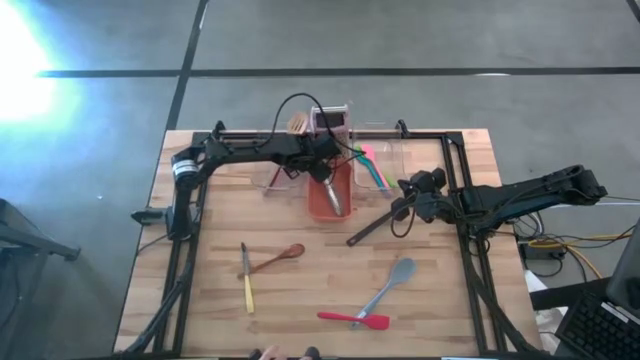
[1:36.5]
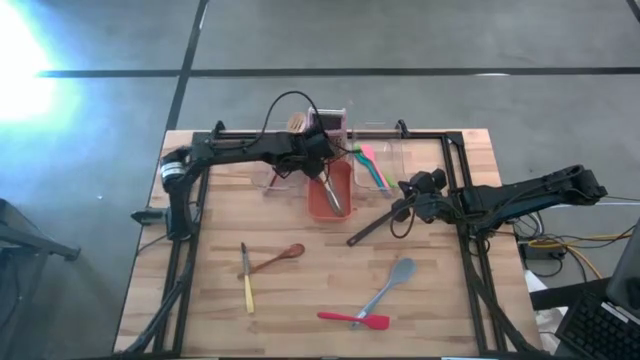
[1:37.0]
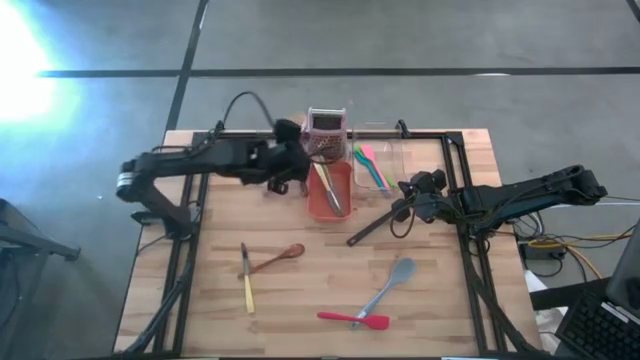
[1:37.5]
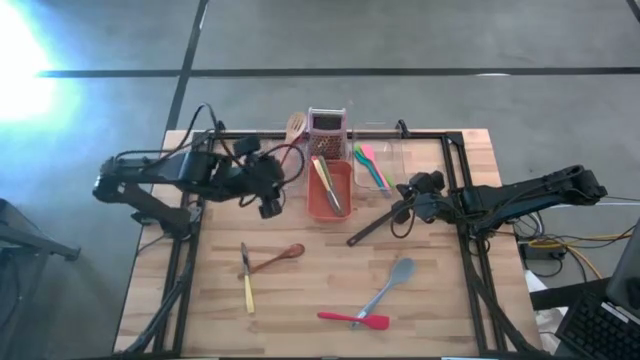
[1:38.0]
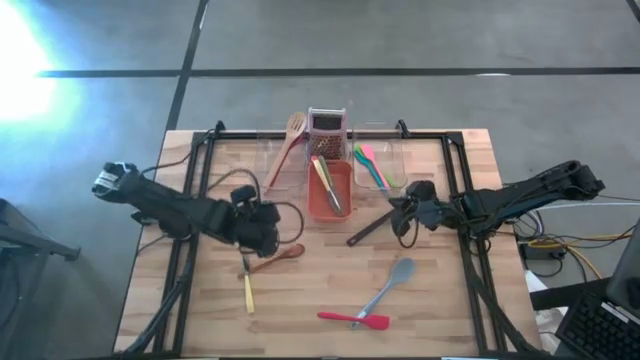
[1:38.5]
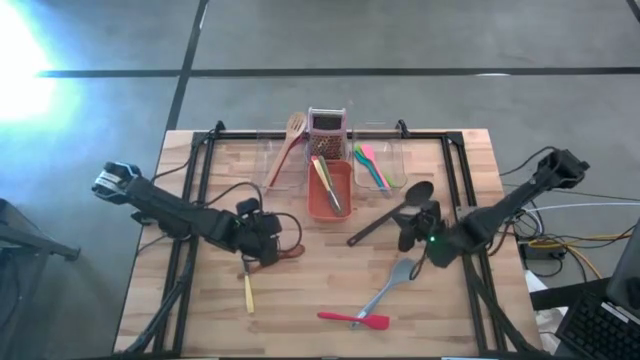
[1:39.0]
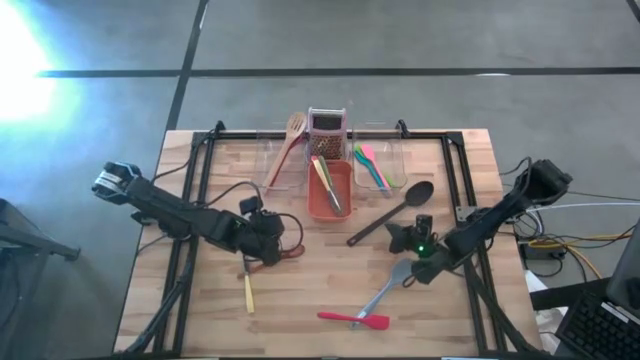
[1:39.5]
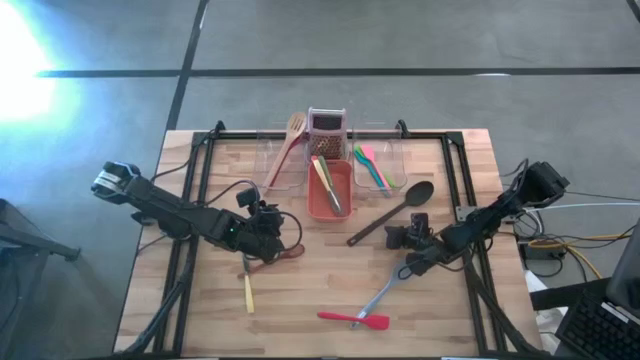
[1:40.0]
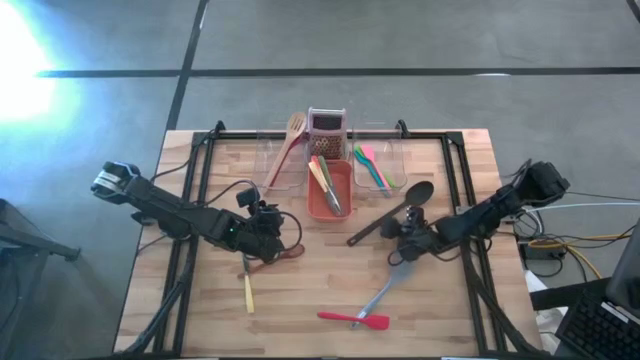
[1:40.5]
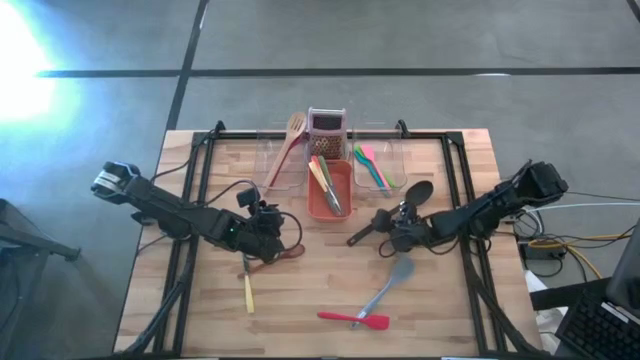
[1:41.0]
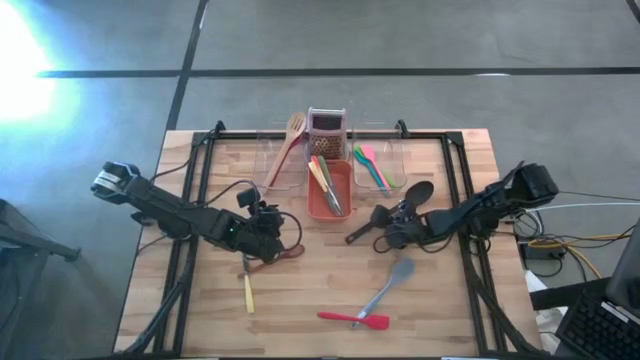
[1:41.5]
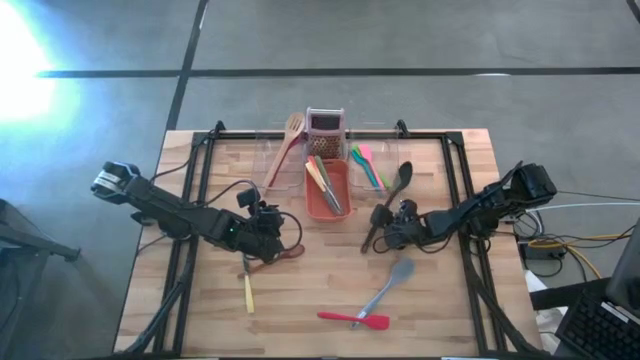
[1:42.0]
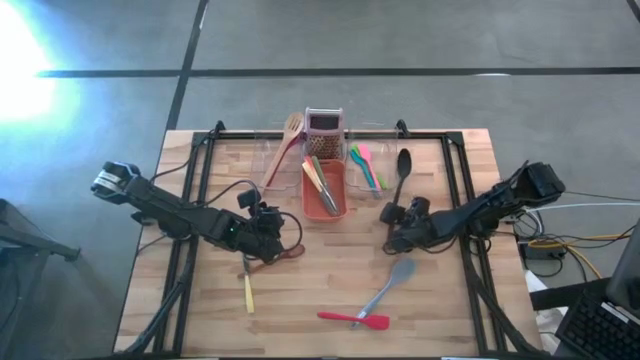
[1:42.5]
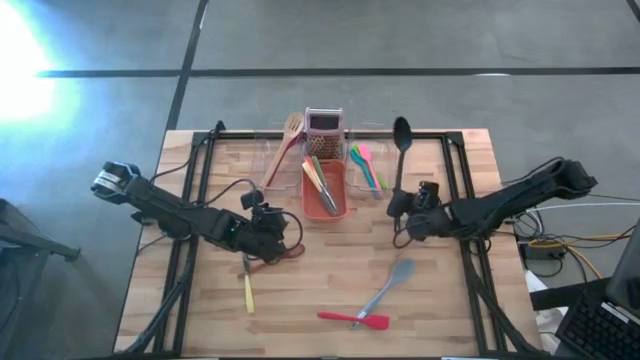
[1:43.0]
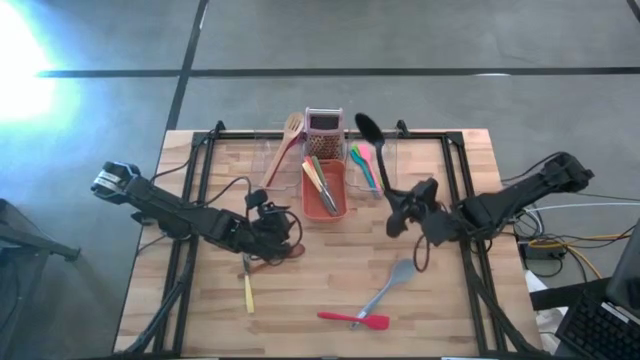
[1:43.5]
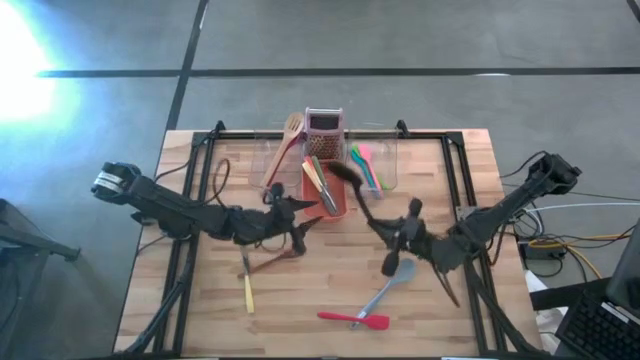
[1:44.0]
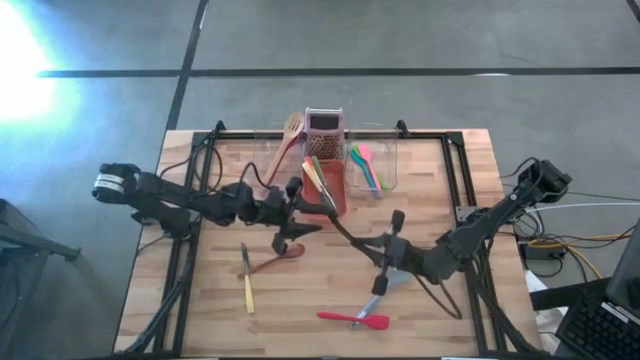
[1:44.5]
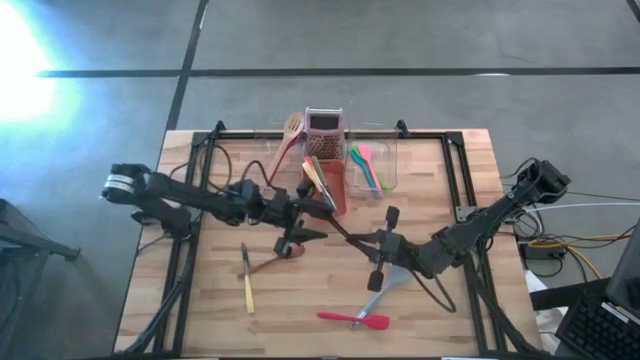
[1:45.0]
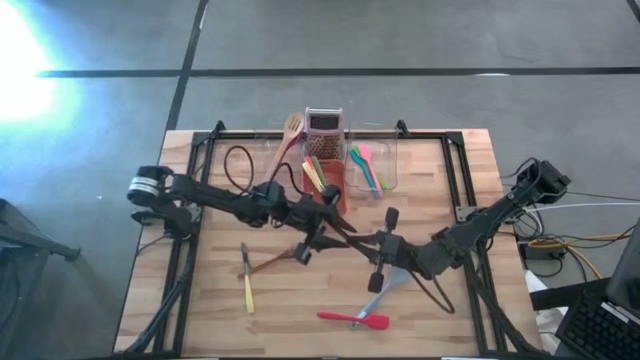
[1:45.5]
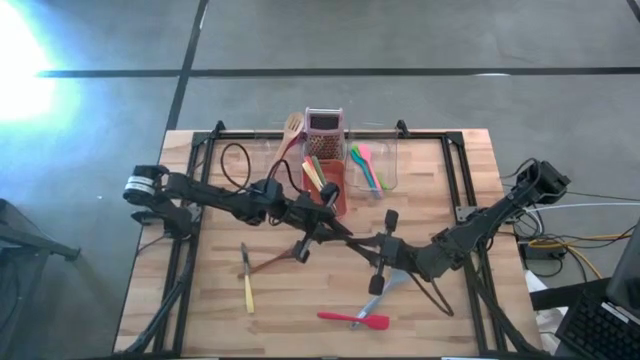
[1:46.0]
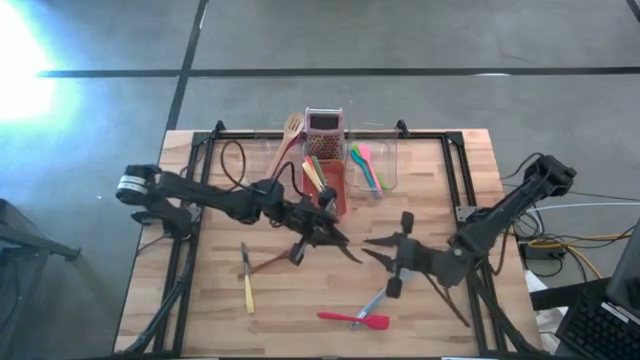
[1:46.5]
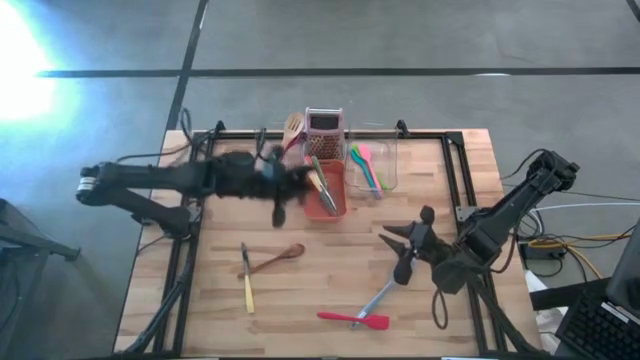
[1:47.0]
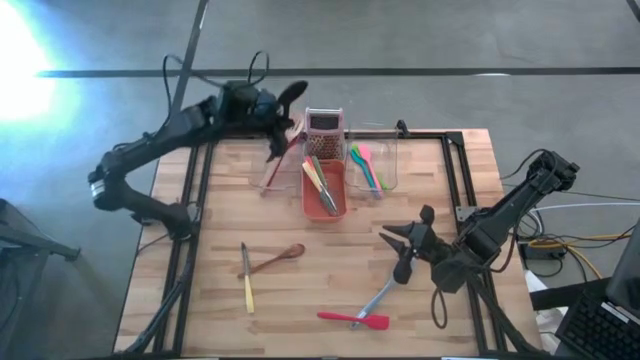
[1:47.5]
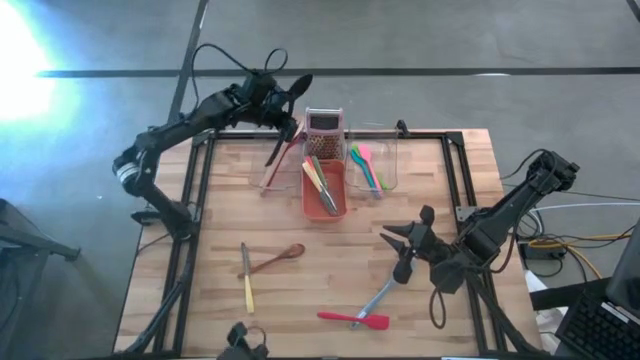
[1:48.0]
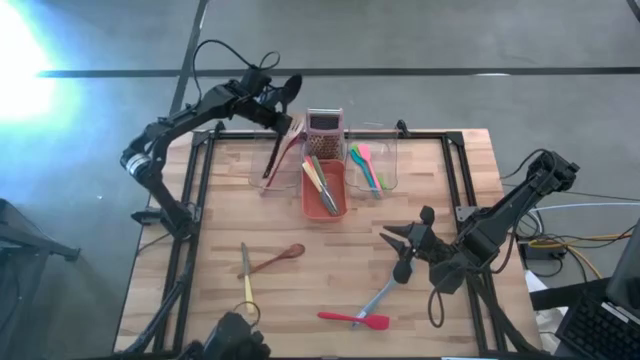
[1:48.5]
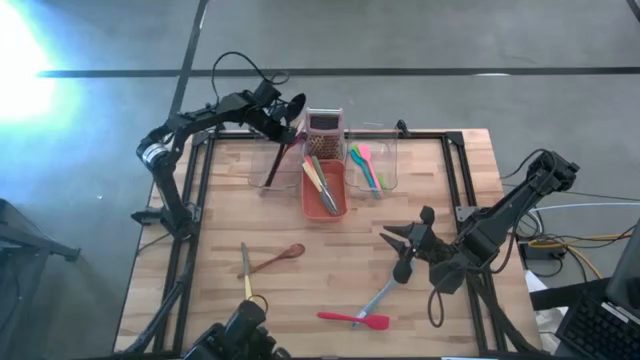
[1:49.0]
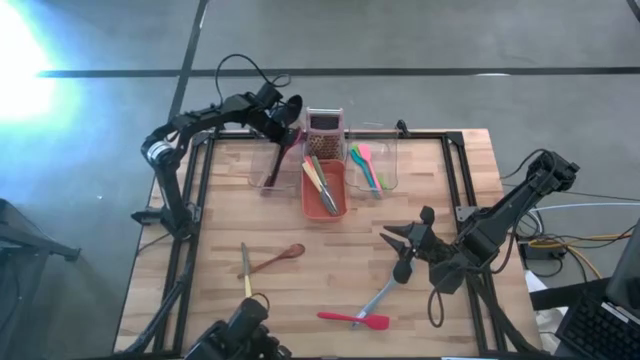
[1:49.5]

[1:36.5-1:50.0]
Task: Pick & Place Kitchen Items
Put the black serving spoon into the left transparent bin

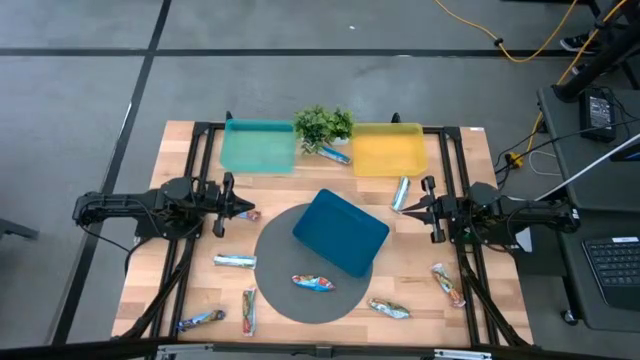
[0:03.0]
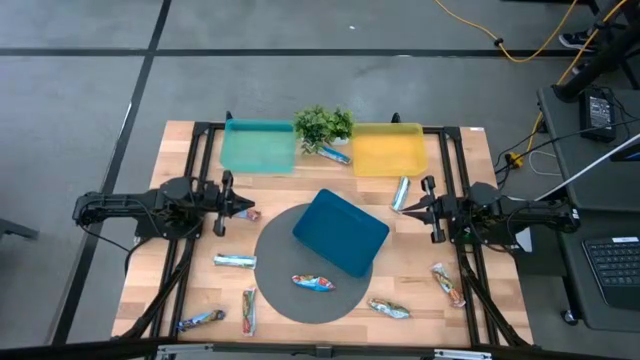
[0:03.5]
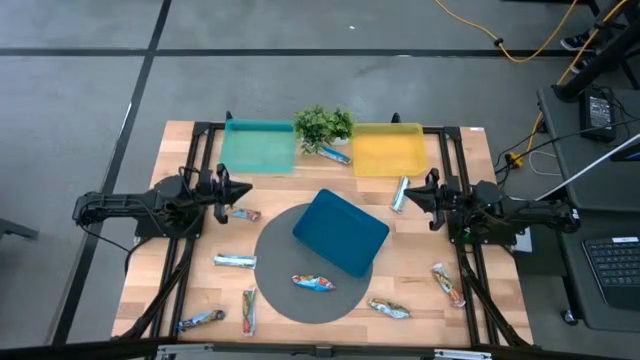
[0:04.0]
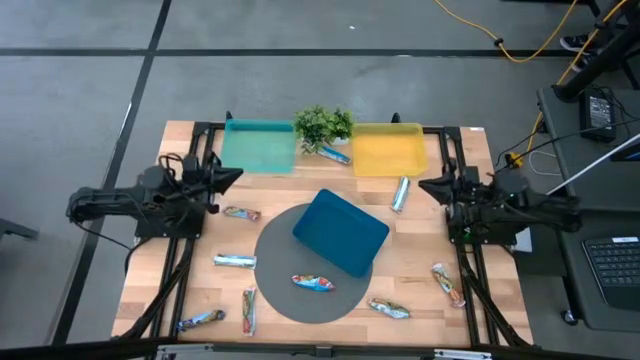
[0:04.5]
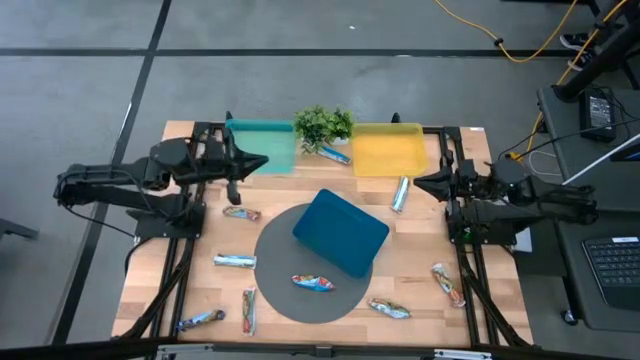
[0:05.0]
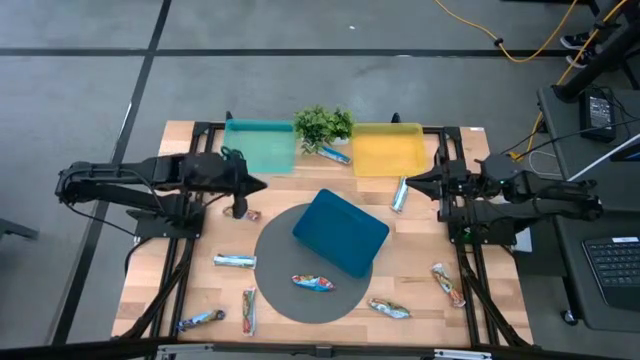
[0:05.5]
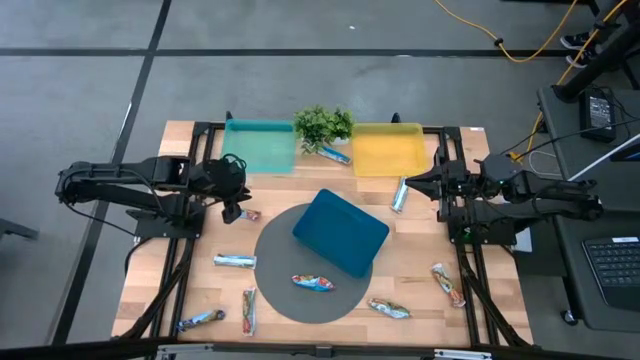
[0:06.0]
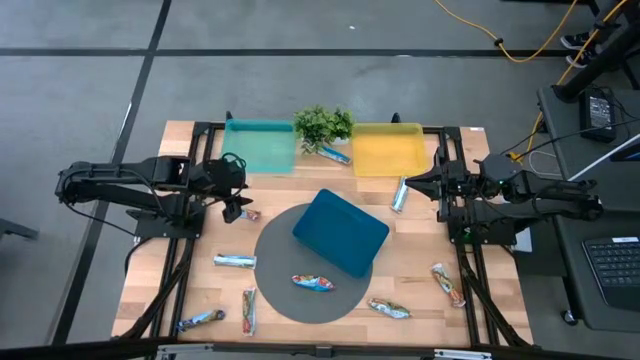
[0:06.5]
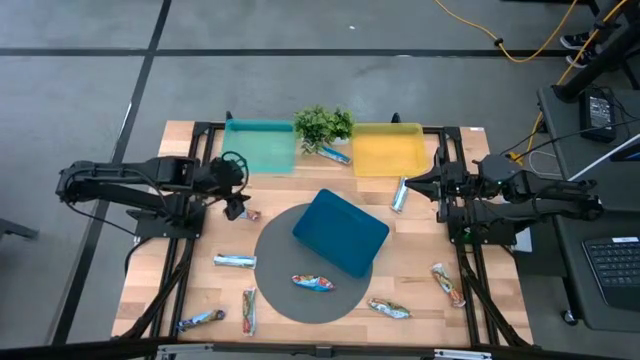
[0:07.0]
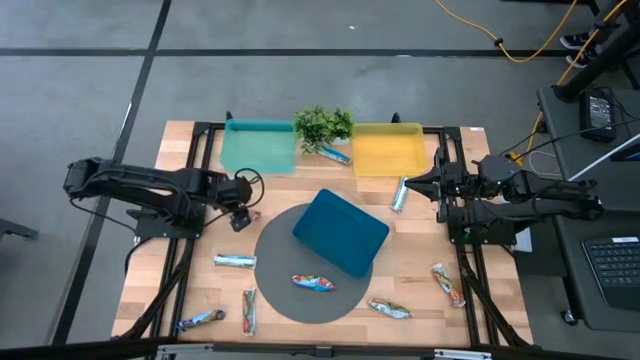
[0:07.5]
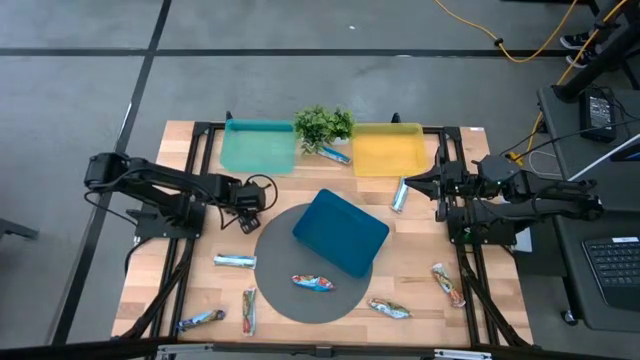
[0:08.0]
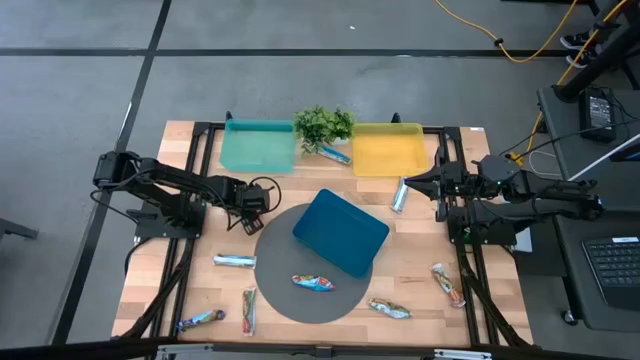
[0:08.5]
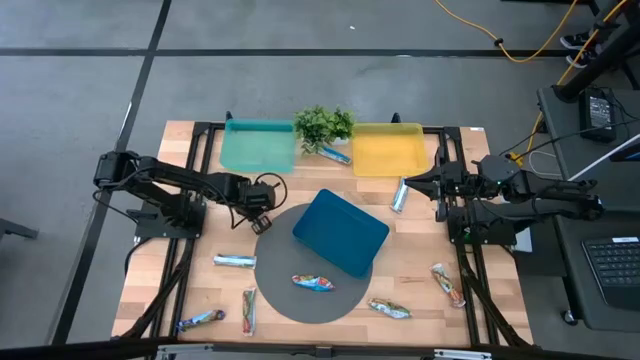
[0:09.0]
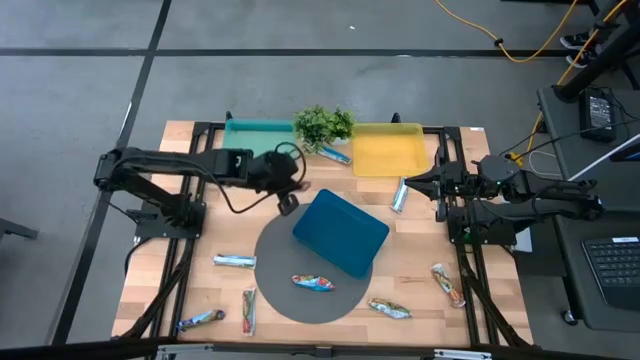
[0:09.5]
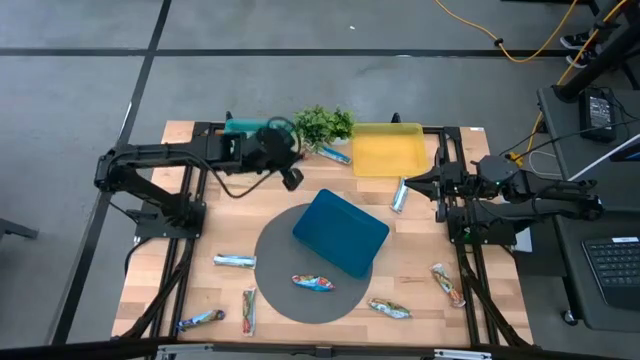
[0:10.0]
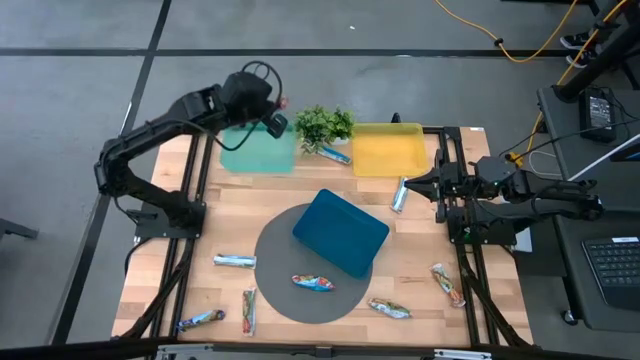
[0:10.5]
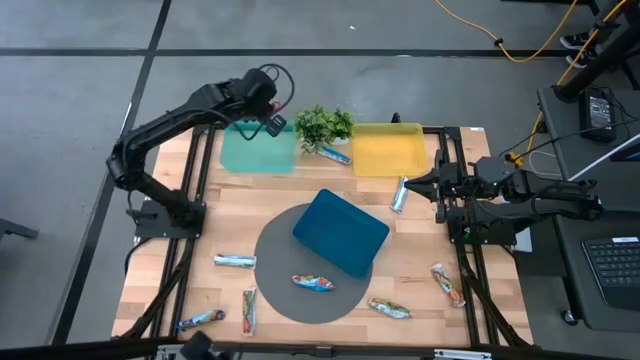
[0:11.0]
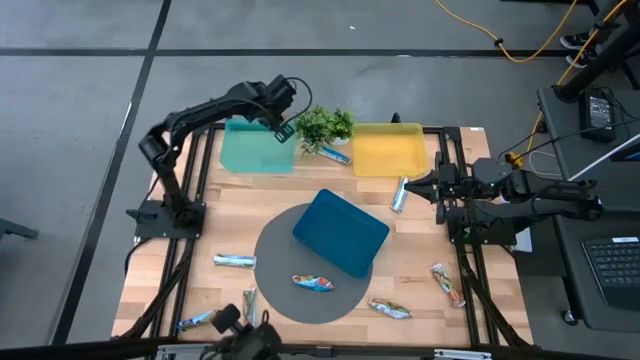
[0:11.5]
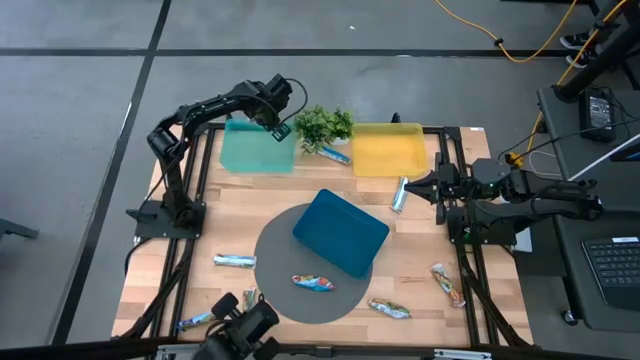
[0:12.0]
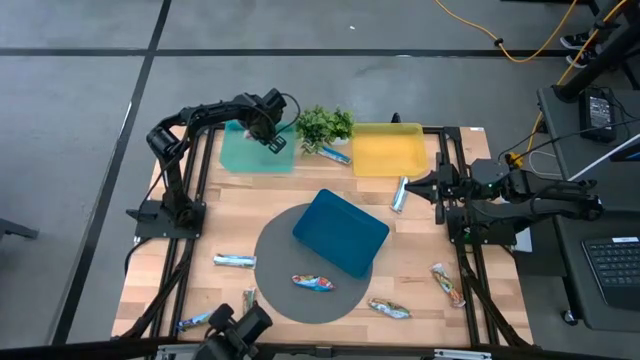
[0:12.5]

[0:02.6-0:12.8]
Task: Pick and place Granola Bars by type
Put the red granola bar into the green bin
